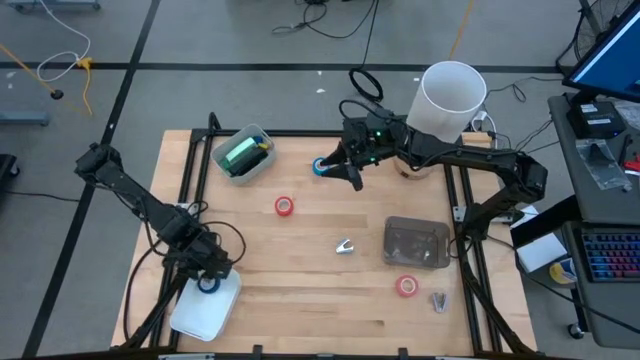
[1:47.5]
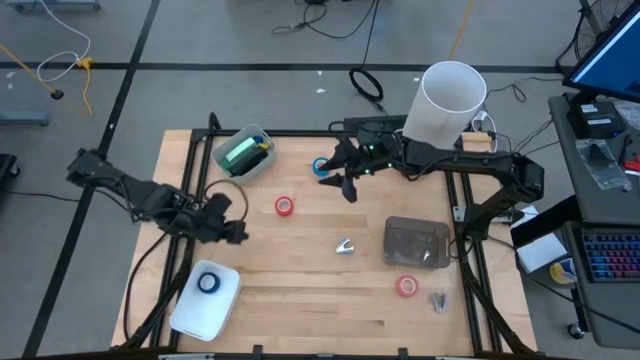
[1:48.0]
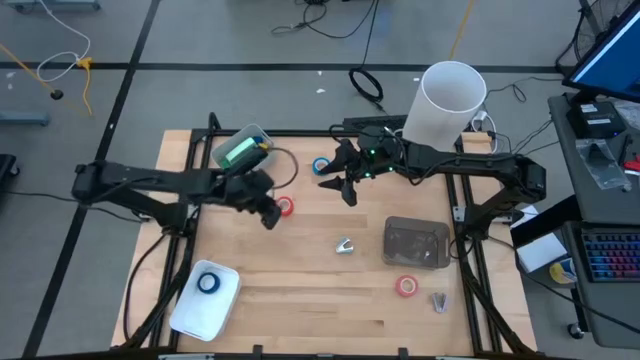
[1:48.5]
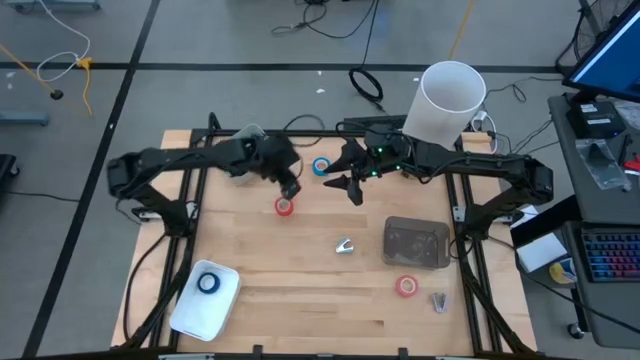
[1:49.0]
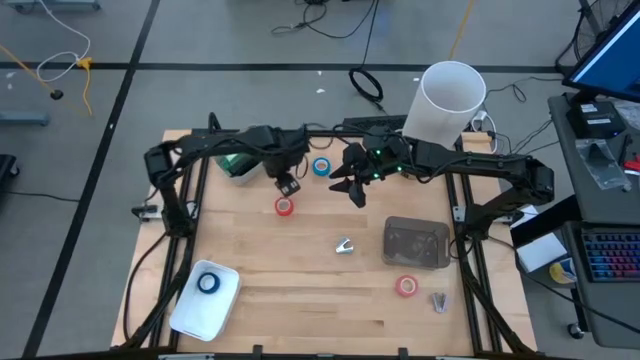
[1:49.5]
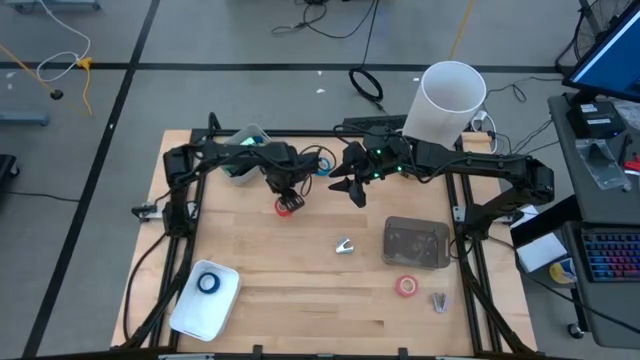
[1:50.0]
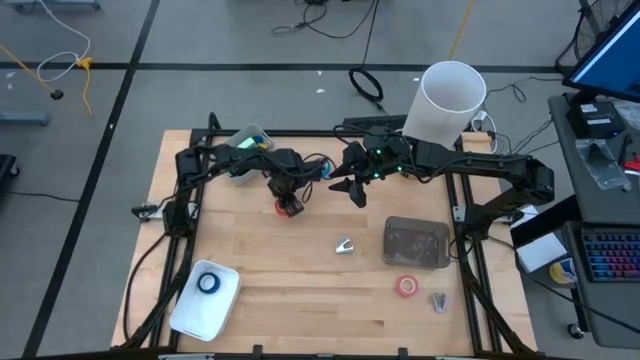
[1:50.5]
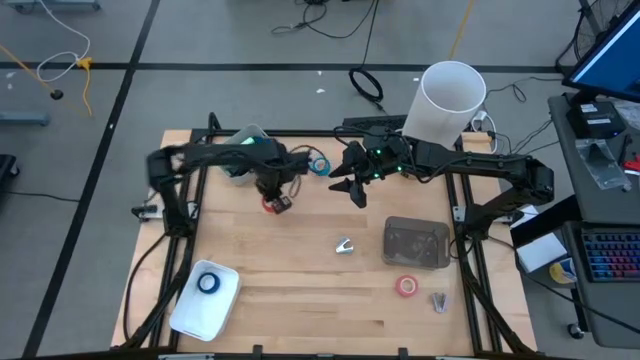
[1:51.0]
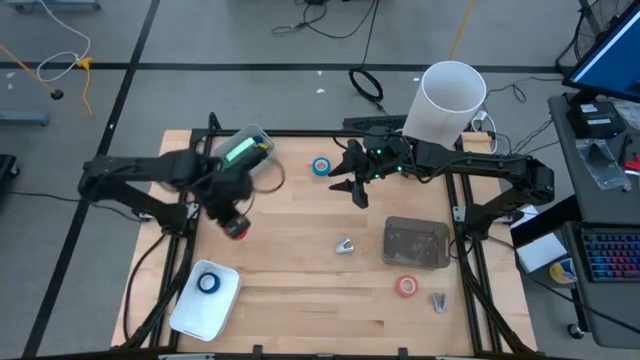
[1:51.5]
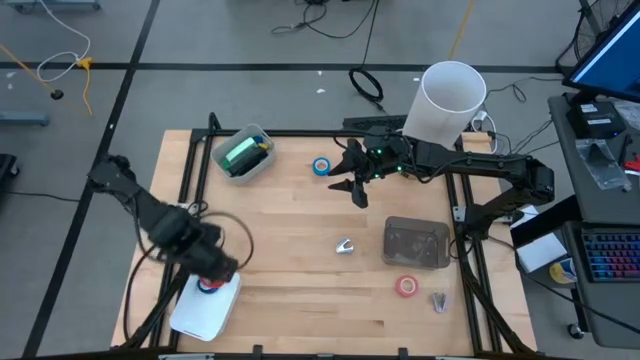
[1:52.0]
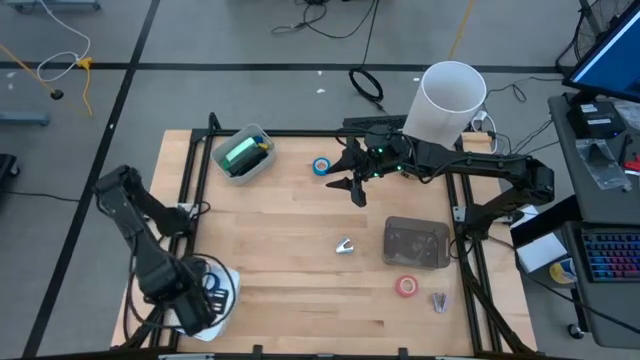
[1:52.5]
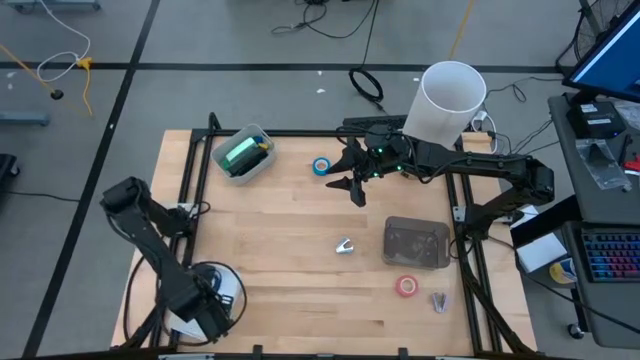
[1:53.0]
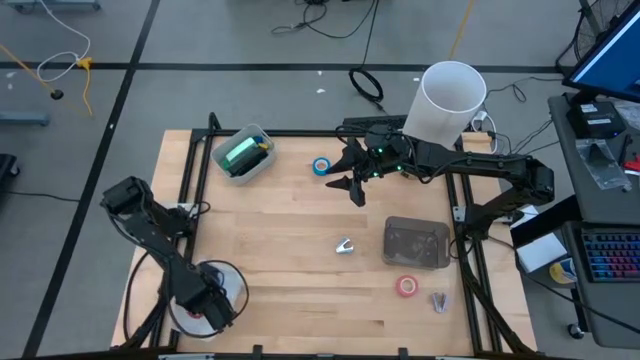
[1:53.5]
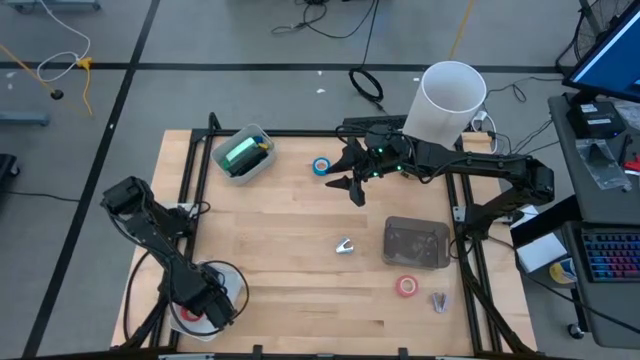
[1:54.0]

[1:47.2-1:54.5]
Task: Pick and place Stapler, Stapler remover, tape
Put the orange tape into the white bin

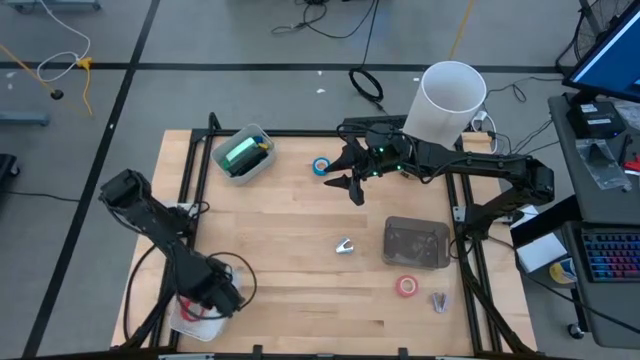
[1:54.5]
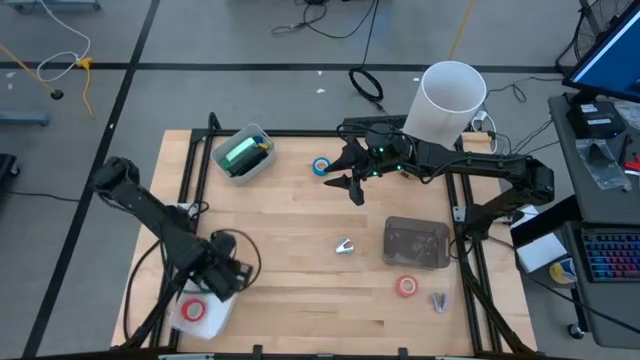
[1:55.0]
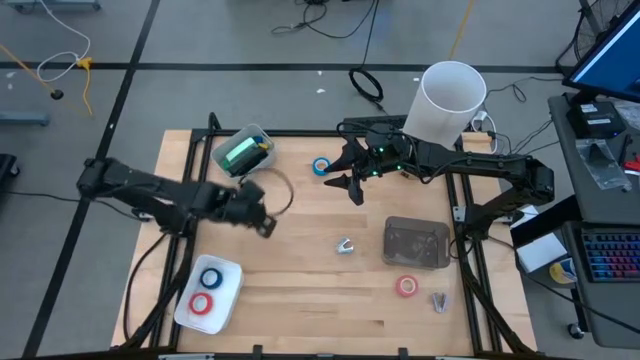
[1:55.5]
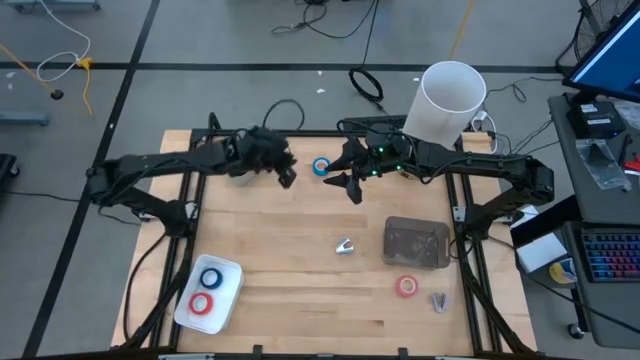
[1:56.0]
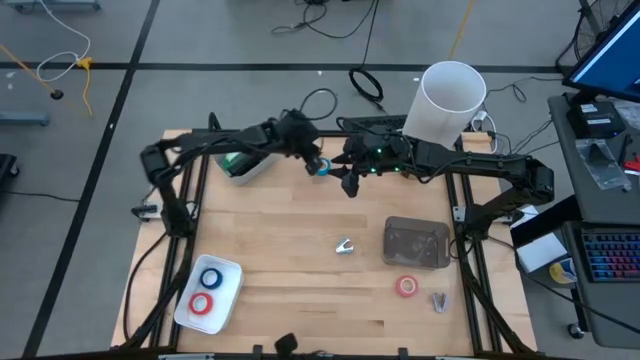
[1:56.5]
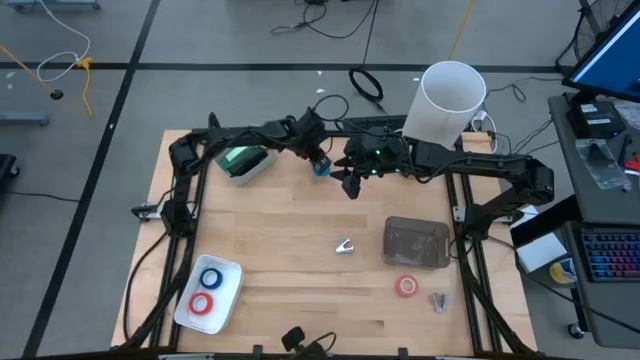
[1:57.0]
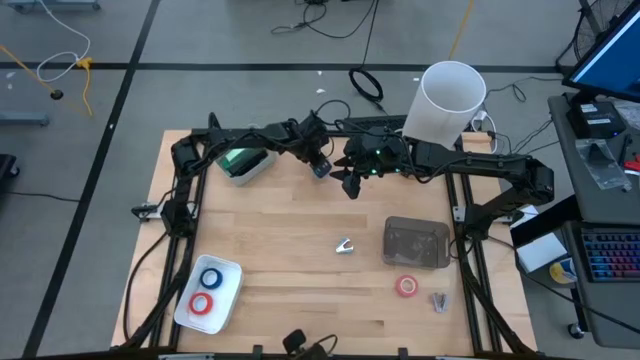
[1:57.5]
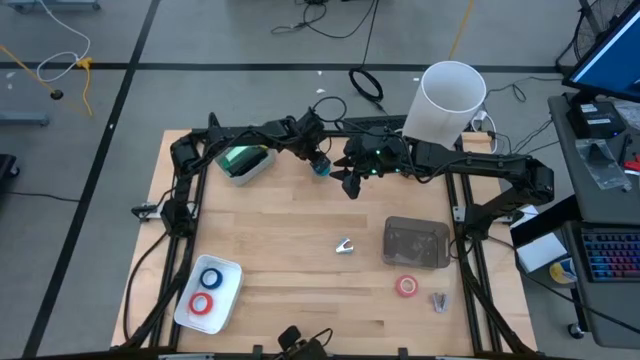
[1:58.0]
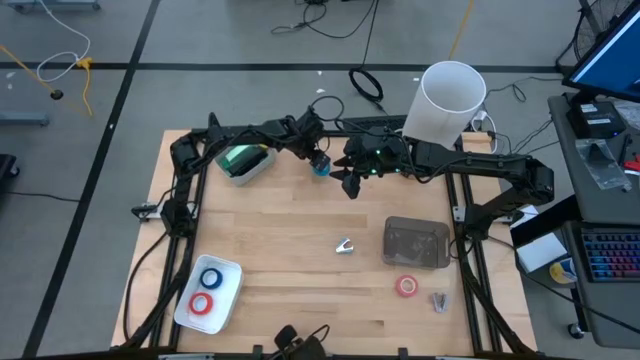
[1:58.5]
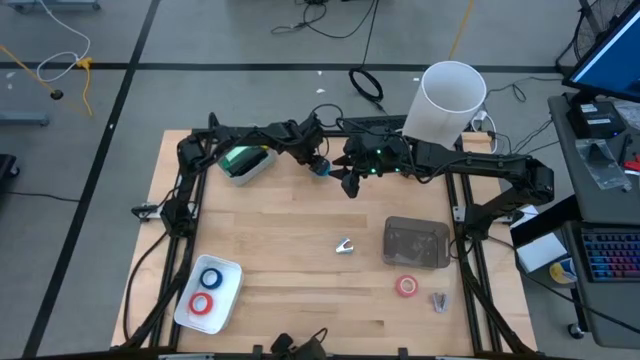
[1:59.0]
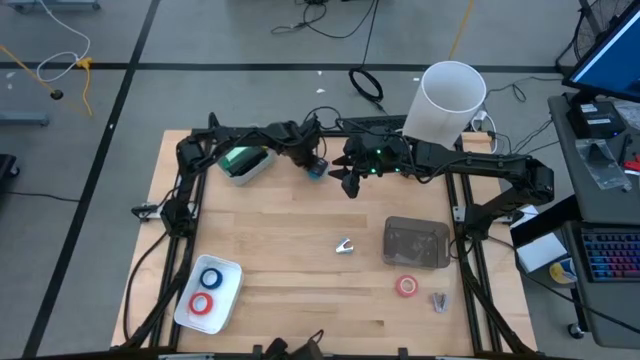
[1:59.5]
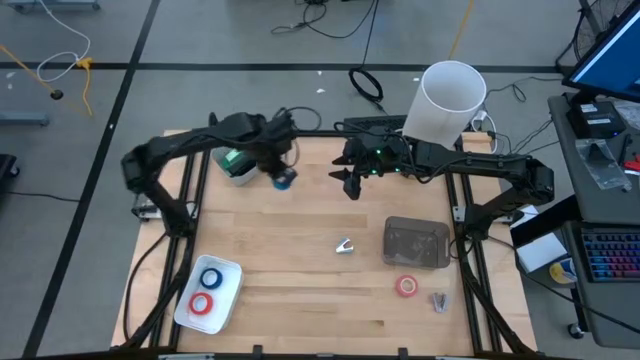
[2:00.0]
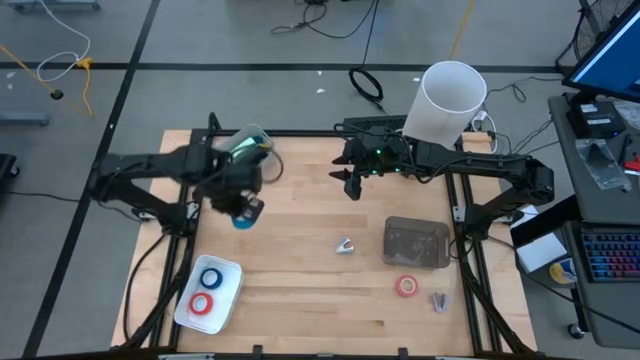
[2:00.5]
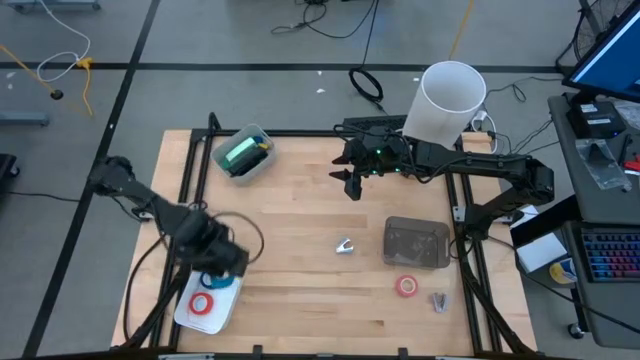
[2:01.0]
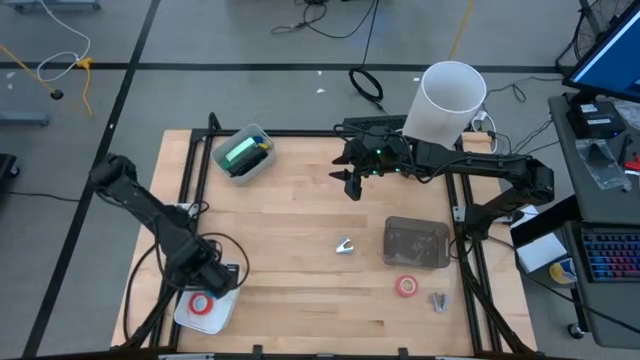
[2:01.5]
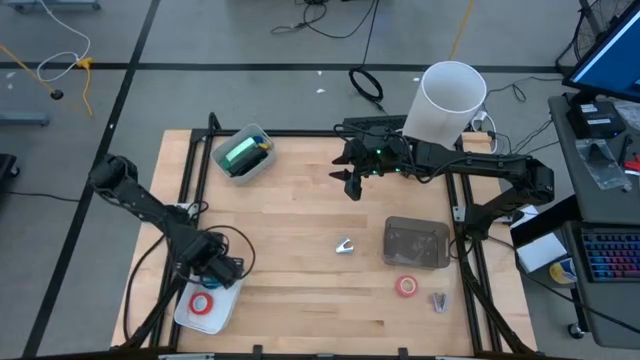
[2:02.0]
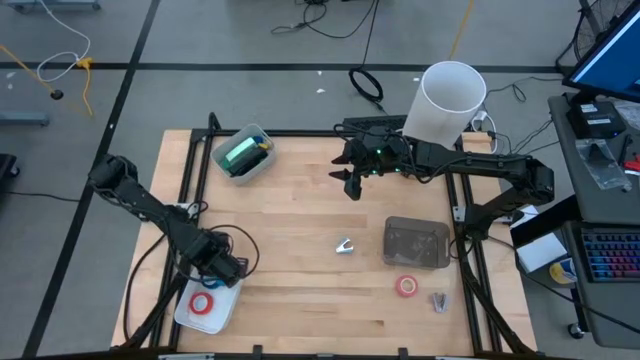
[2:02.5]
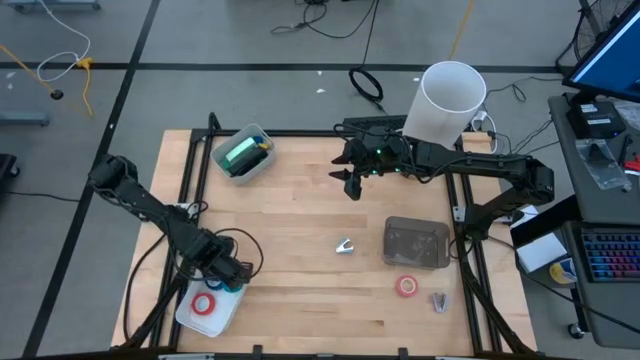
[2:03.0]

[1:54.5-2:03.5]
Put the light blue tape into the white bin
